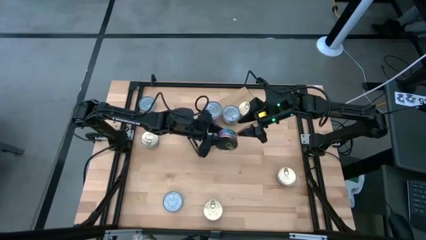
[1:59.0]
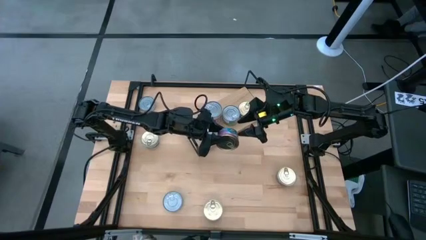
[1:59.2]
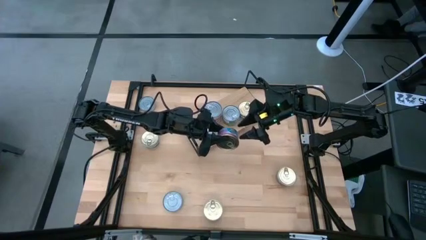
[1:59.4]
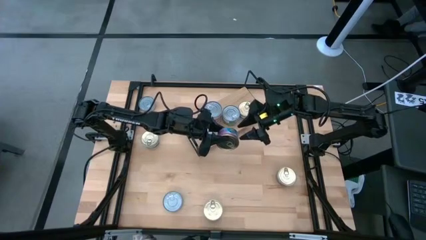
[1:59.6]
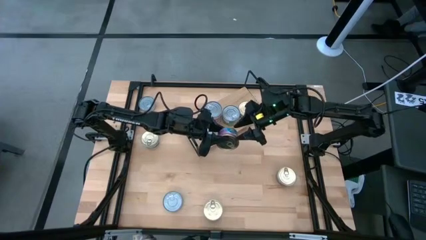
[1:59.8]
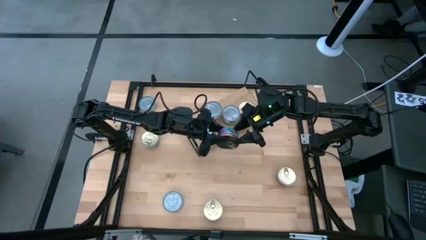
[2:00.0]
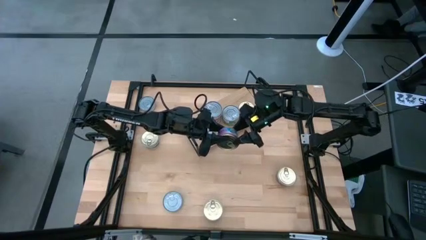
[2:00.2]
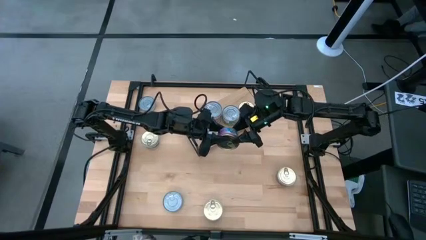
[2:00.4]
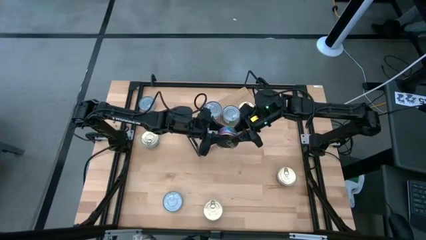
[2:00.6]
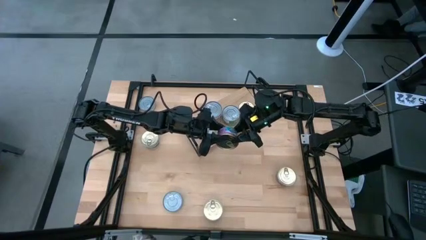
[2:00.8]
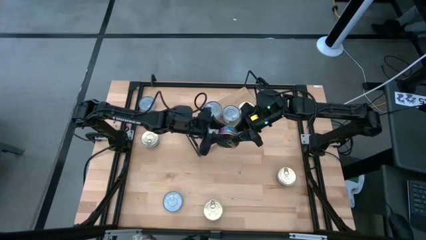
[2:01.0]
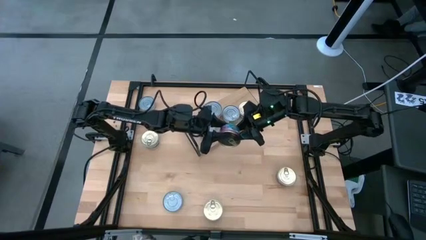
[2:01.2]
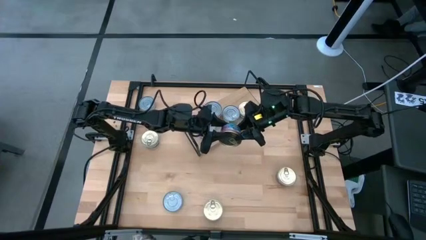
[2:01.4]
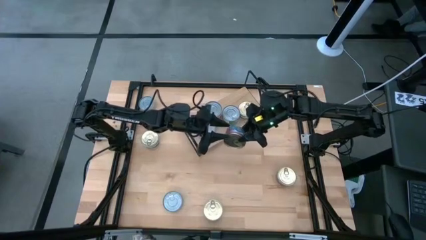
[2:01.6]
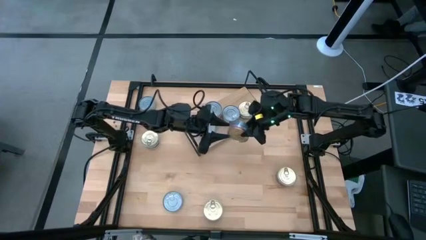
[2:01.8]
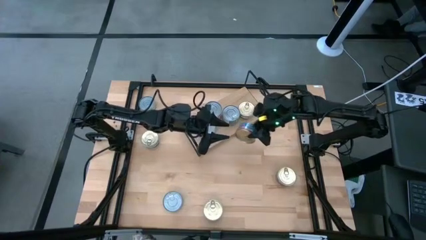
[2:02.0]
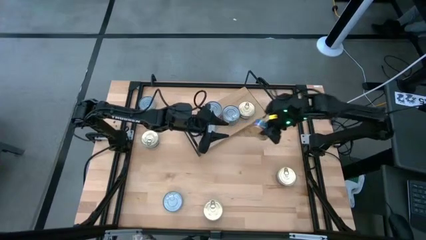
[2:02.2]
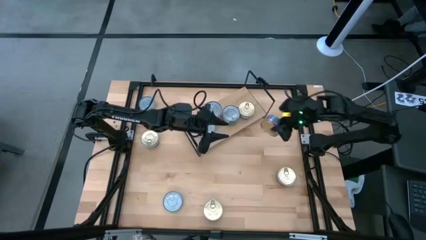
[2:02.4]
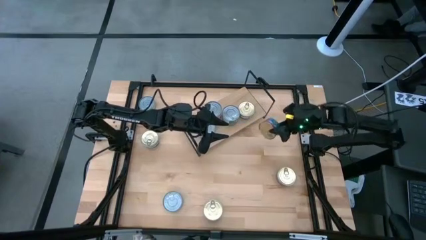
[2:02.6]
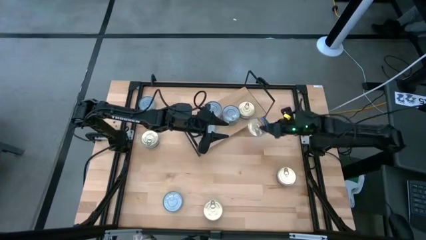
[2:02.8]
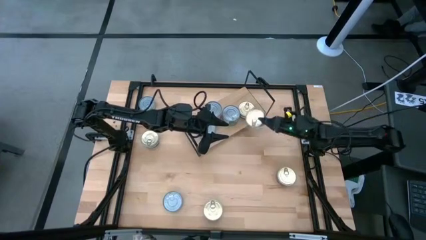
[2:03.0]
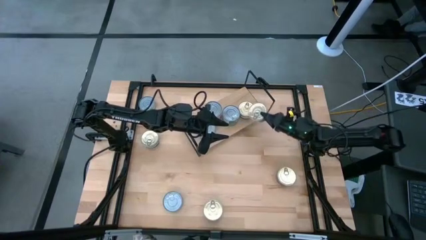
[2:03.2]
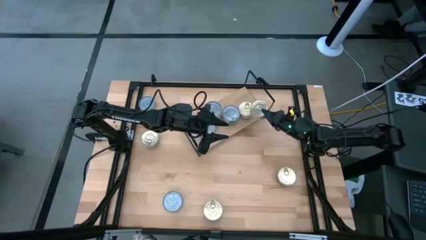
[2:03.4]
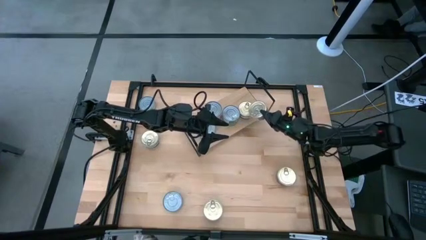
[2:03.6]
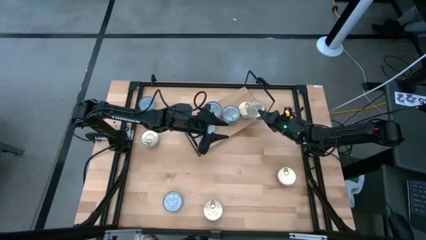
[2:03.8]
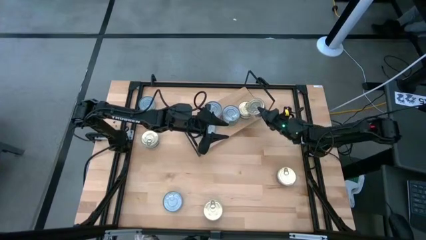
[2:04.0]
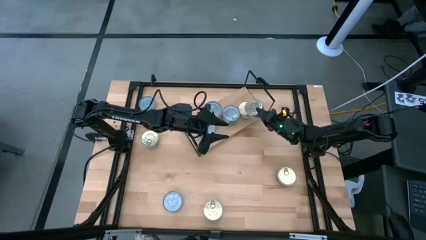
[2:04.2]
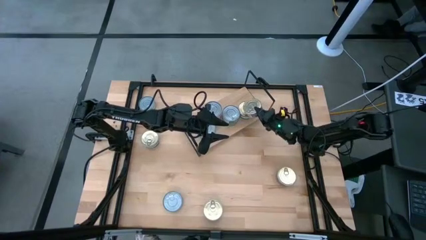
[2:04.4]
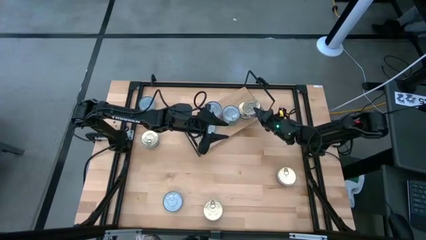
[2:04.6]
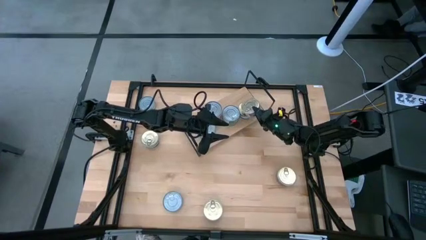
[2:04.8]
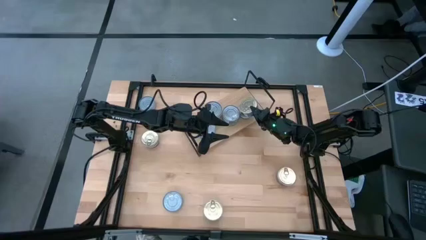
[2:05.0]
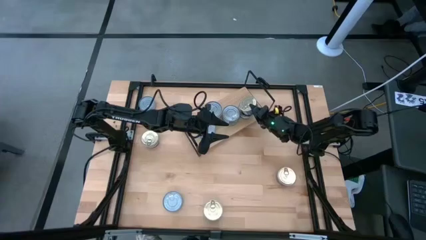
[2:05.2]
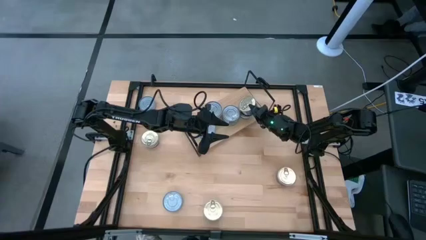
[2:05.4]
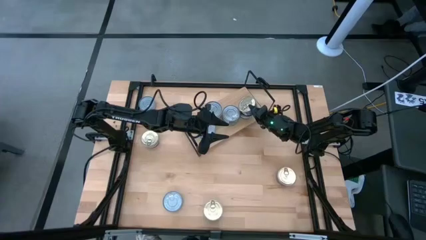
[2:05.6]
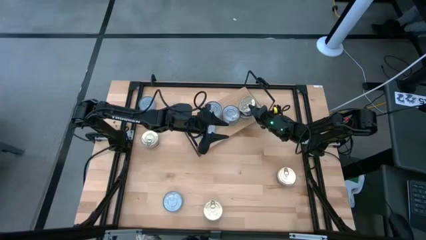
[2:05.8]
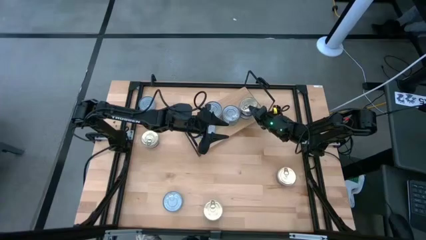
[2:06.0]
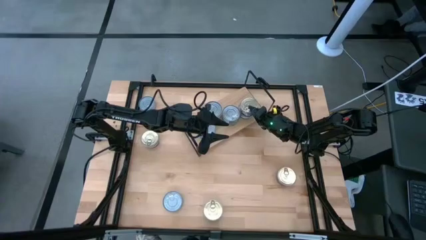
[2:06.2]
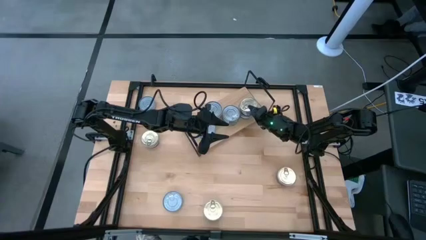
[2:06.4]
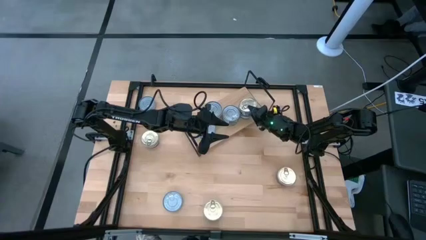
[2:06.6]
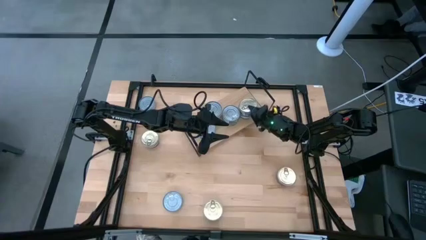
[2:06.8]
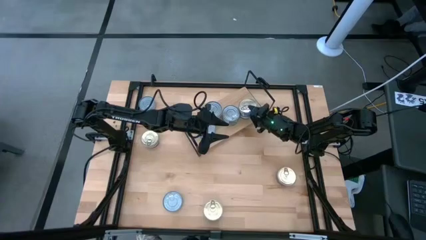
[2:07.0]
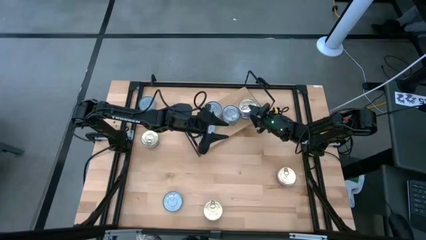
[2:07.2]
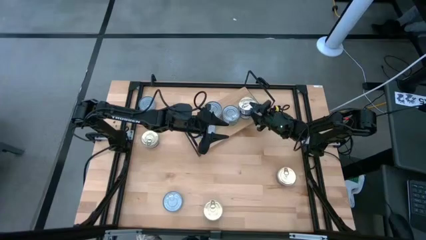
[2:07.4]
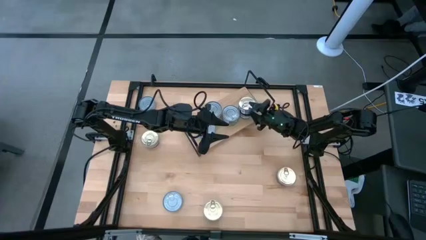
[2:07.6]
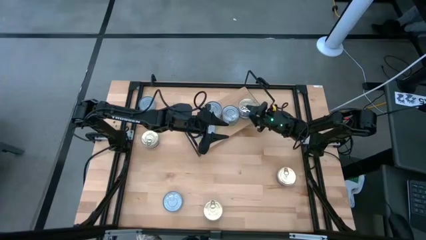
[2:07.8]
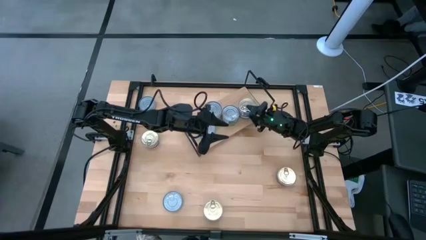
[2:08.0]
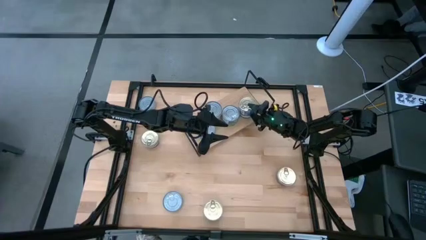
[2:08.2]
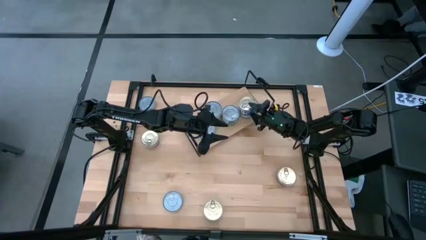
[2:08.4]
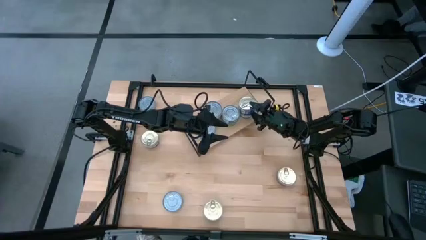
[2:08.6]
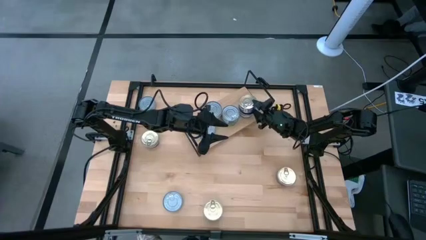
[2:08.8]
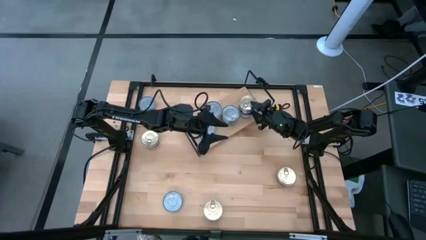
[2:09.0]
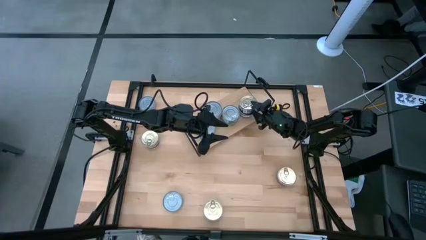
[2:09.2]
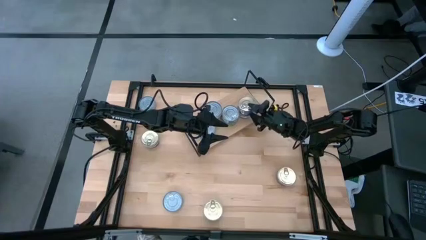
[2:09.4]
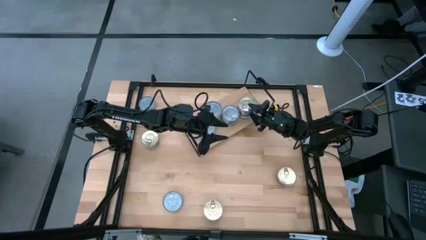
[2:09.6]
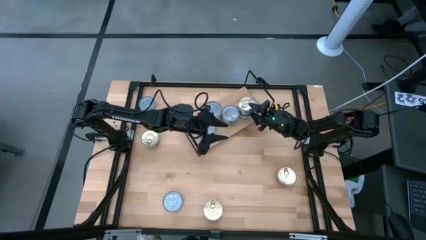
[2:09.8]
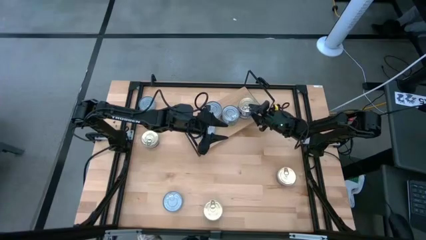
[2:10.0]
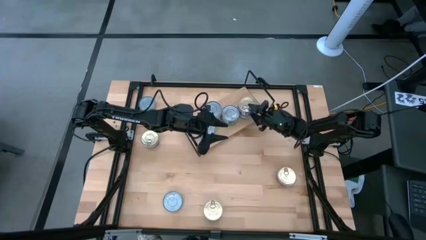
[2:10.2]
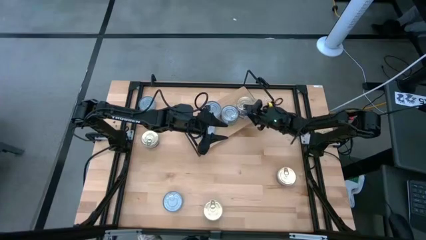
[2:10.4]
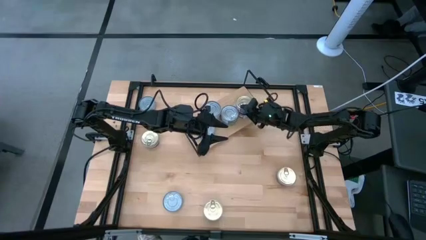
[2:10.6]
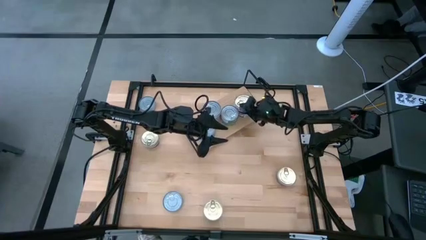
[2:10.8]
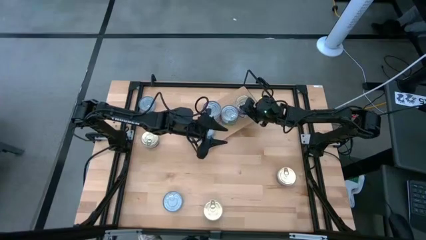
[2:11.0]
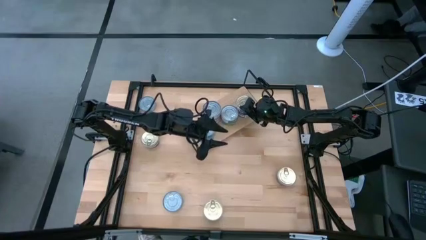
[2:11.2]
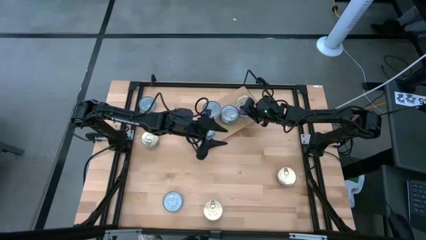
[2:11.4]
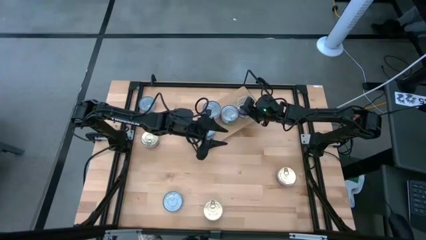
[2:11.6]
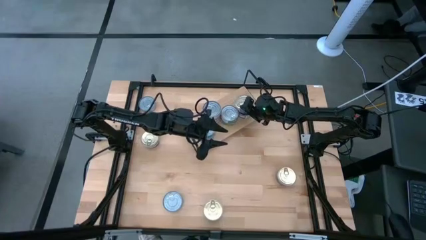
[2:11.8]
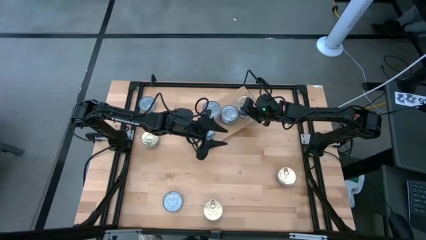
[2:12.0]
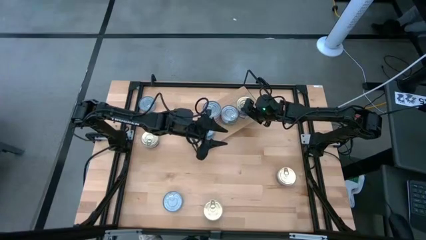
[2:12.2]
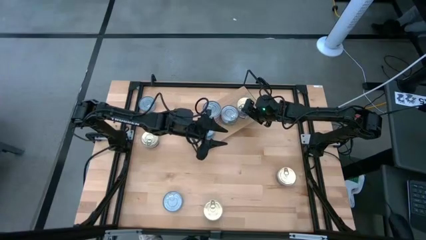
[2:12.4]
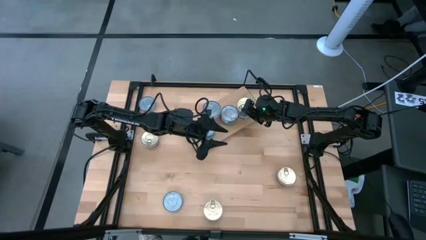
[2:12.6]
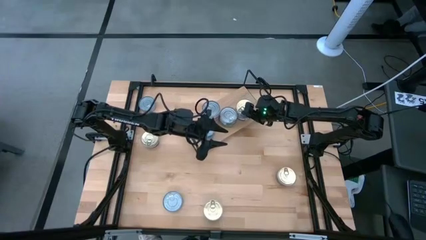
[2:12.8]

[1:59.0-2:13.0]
Task: Stack canned seafood by type on shelf
Stack the blue and pink tuna can on the shelf on top of the other blue and pink tuna can
